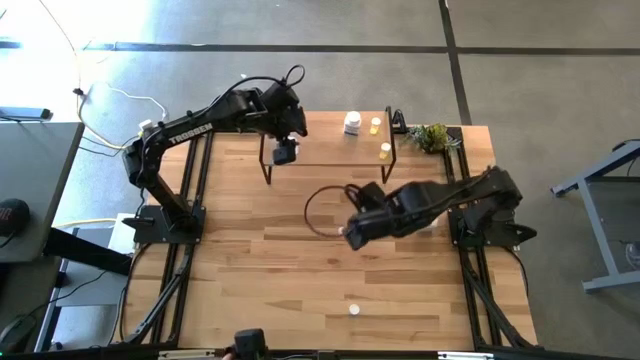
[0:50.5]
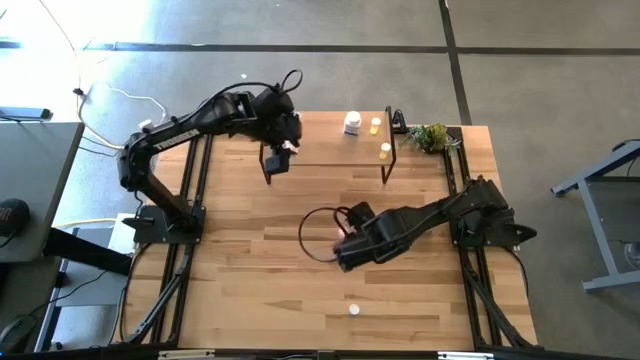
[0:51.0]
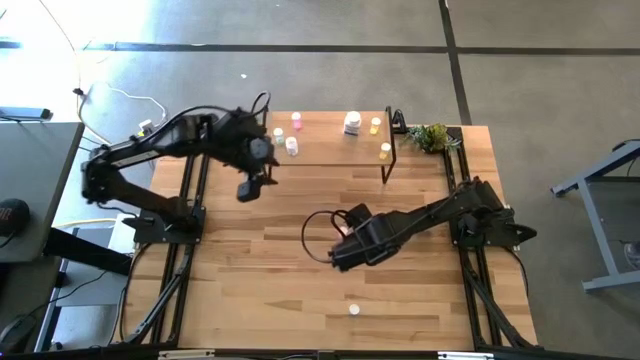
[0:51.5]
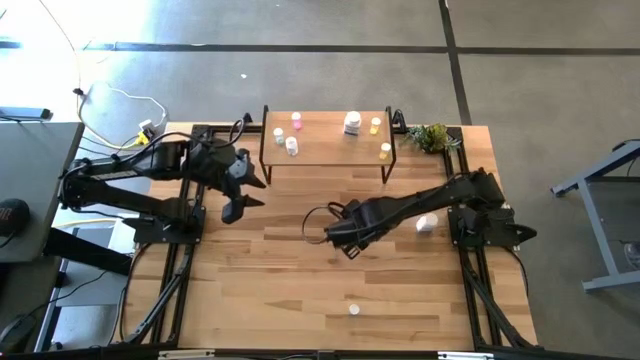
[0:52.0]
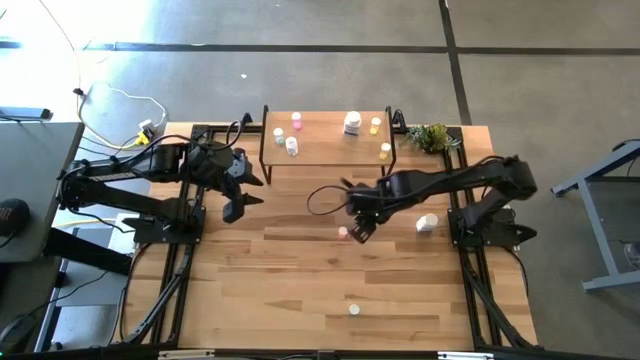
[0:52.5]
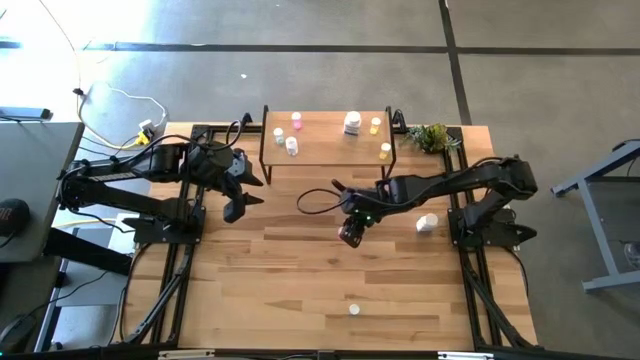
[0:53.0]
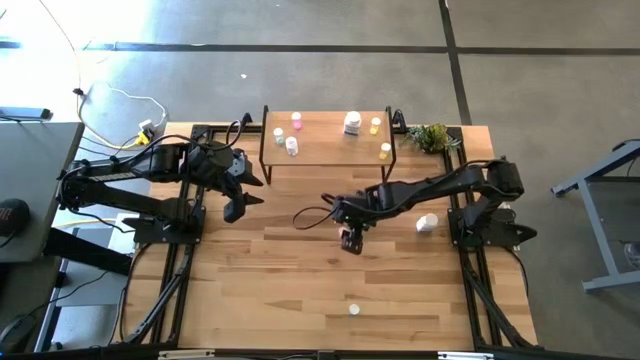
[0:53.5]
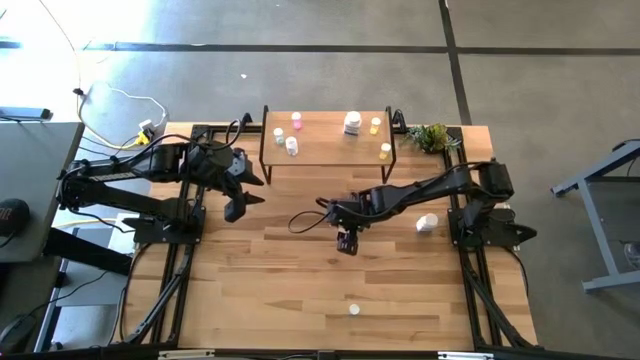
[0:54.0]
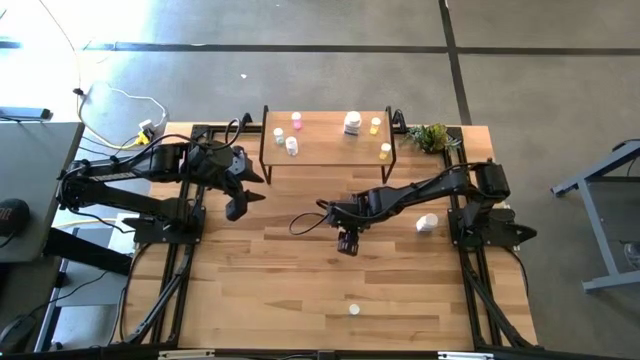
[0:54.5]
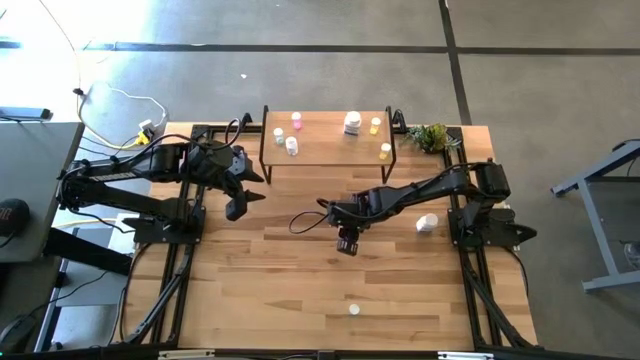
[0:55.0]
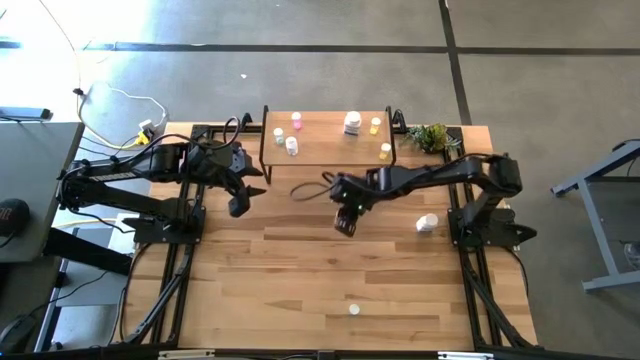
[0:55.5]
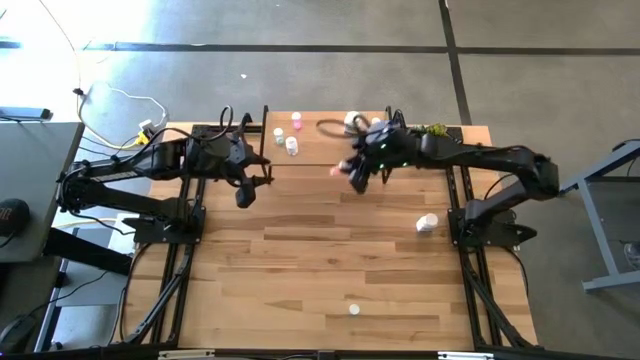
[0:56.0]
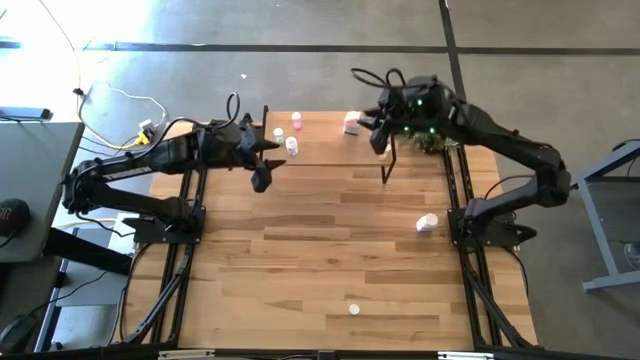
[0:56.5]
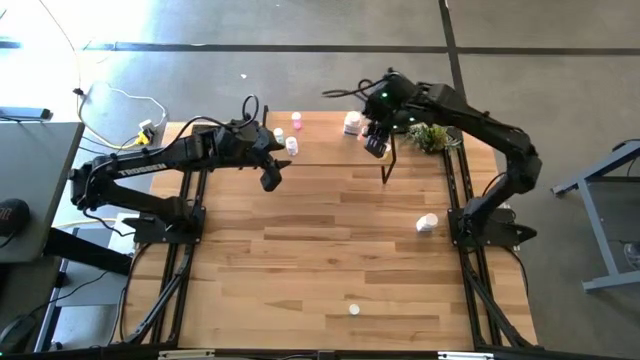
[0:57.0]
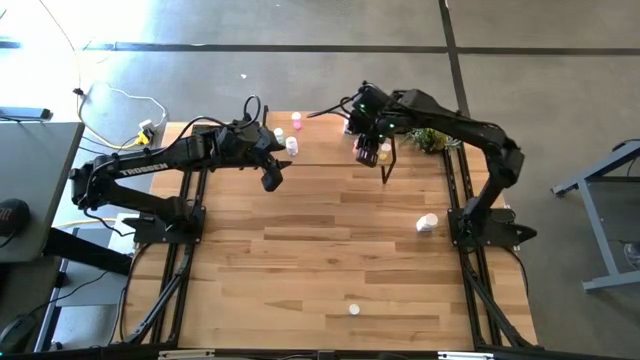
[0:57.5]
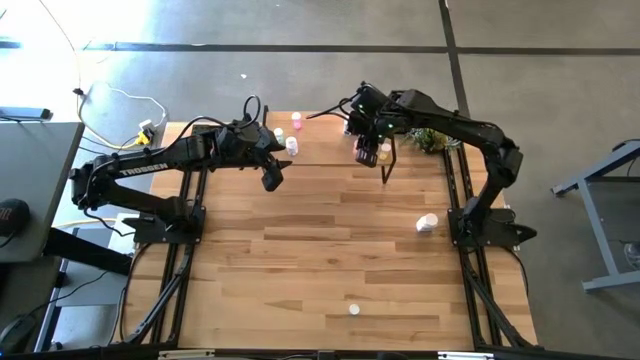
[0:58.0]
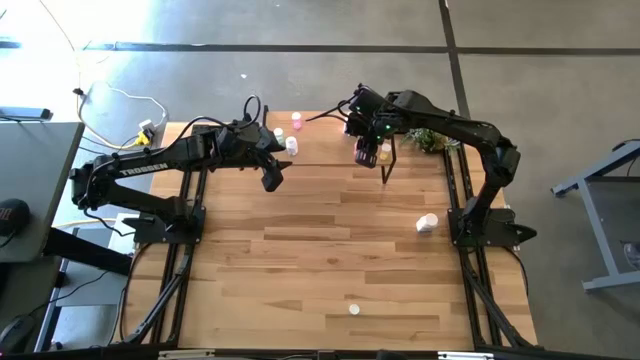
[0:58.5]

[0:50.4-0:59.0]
Task: Pick and place medicine bottles onto shelf by color
Put the pink pill bottle on the shelf

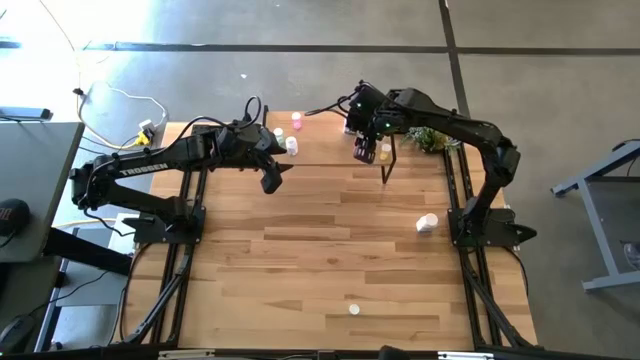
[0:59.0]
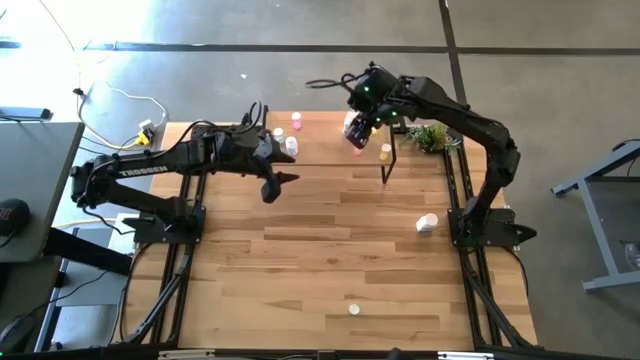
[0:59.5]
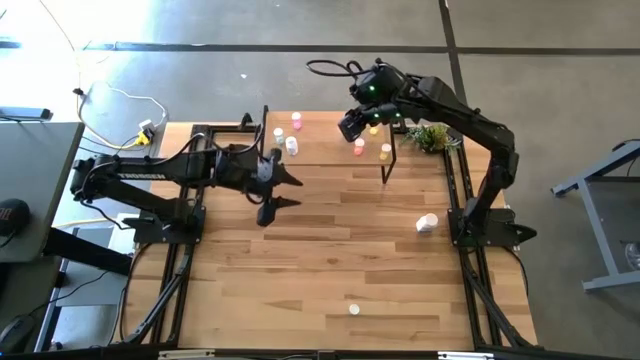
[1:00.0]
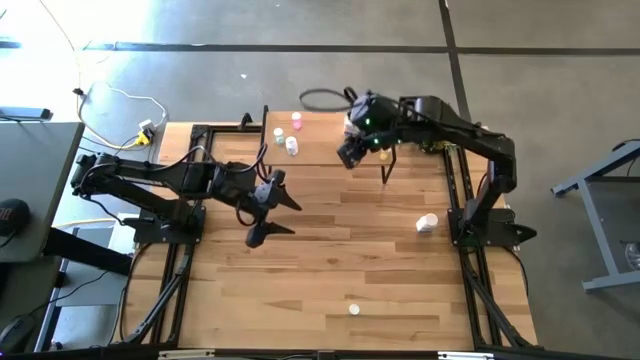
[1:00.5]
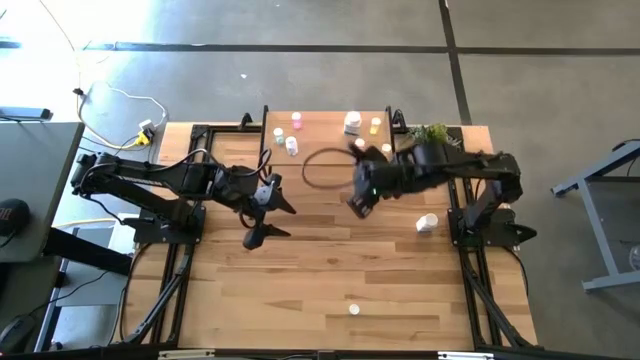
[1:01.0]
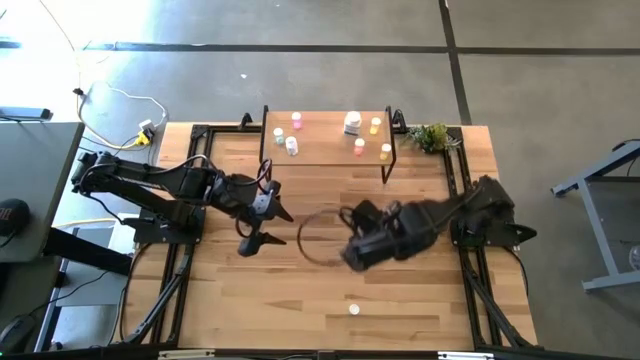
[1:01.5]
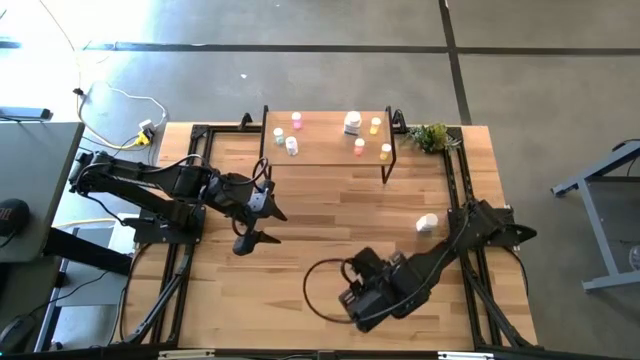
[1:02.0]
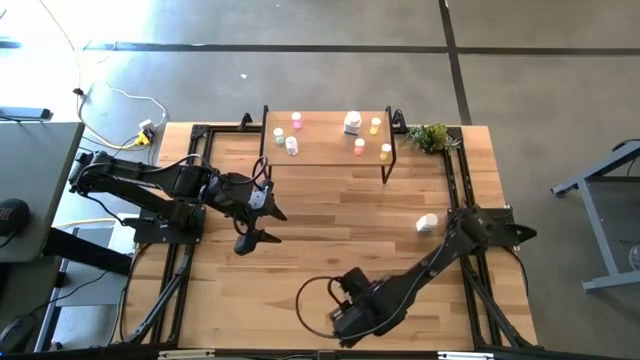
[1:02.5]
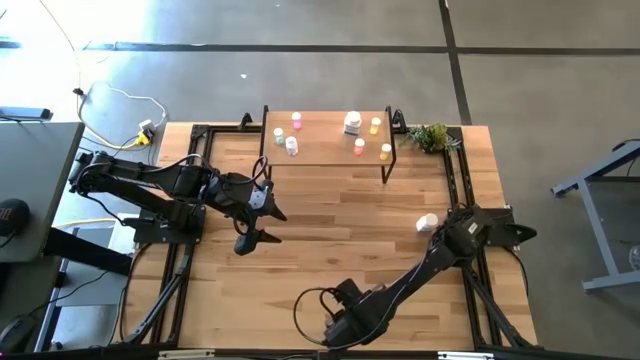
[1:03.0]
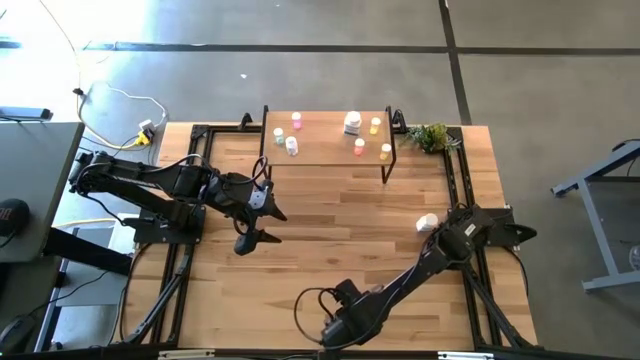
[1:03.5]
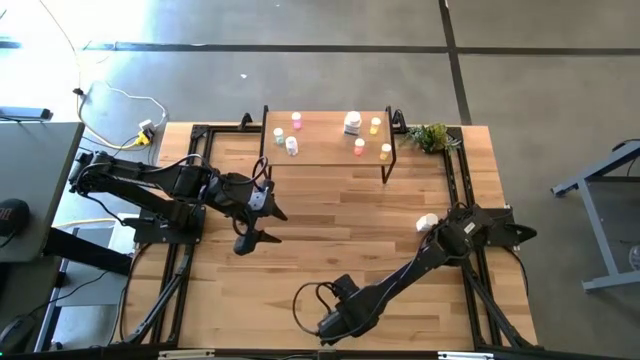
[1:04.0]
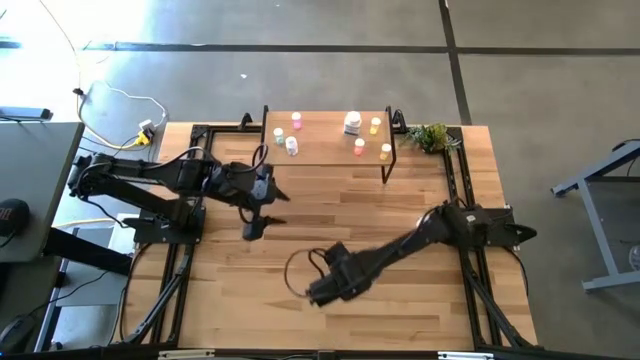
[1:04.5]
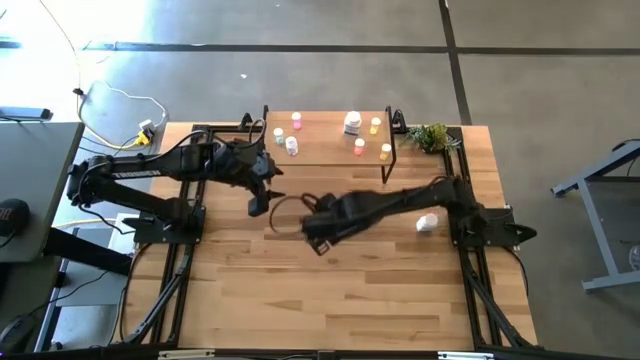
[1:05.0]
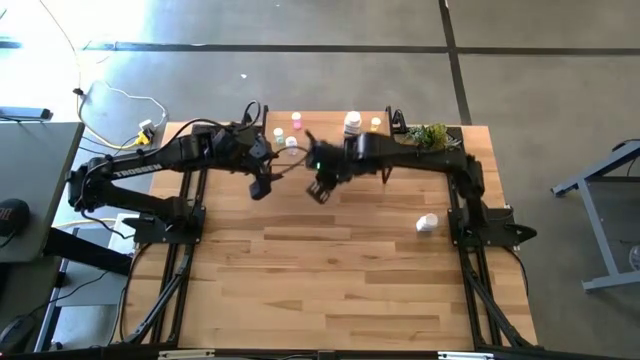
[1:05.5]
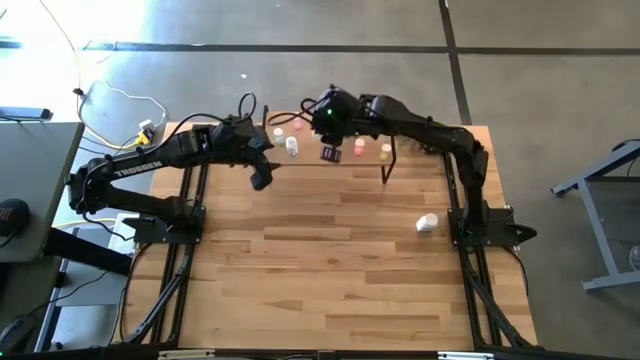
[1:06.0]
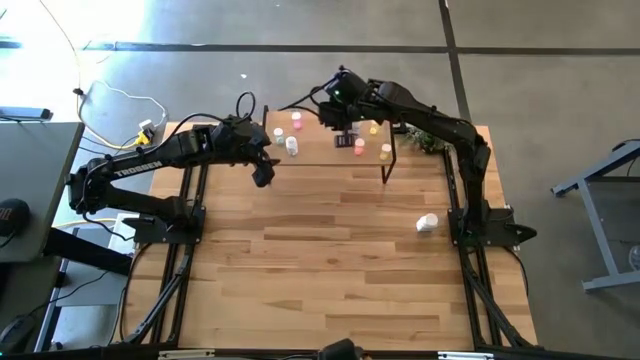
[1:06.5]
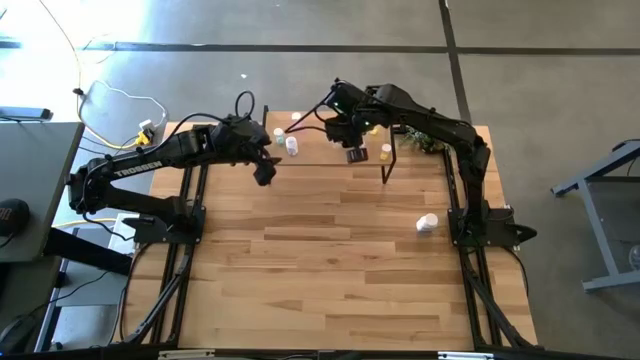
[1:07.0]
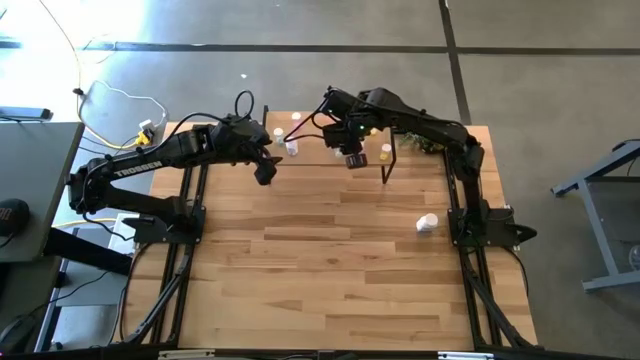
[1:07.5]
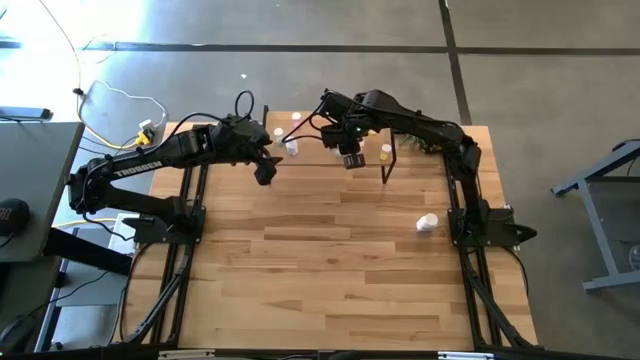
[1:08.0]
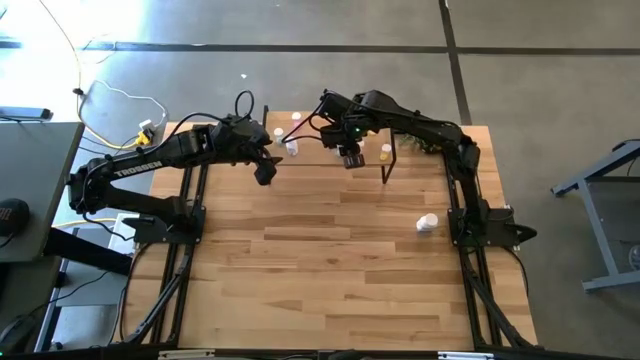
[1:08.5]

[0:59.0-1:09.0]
Put the green pill bottle on the shelf

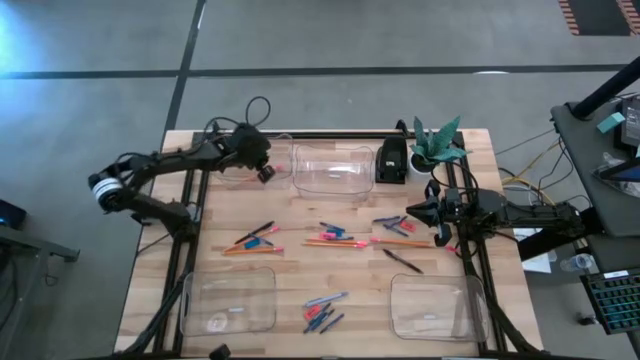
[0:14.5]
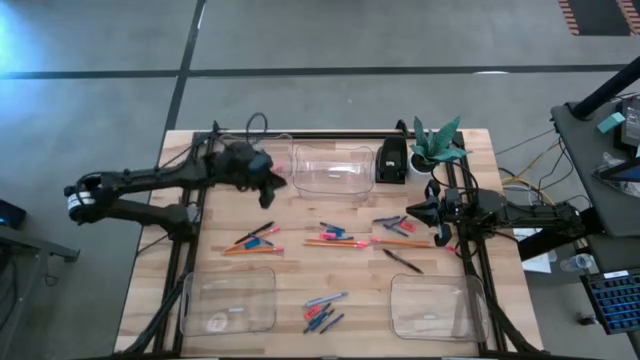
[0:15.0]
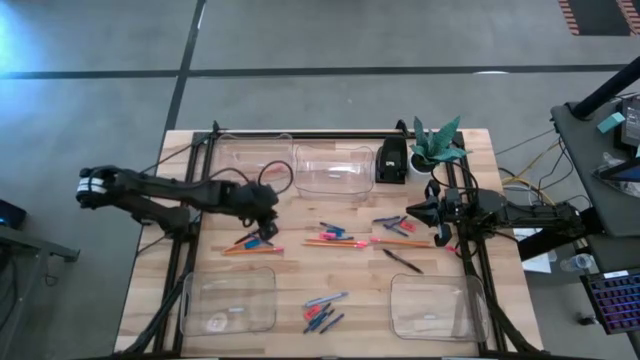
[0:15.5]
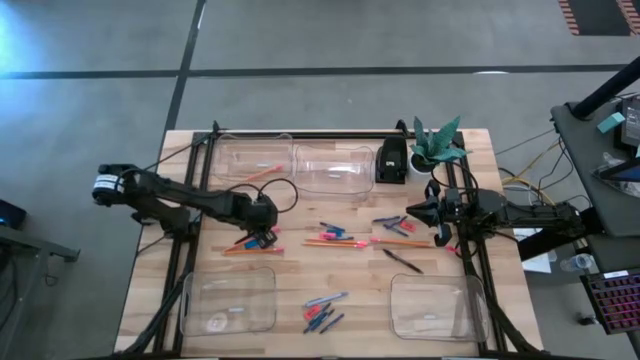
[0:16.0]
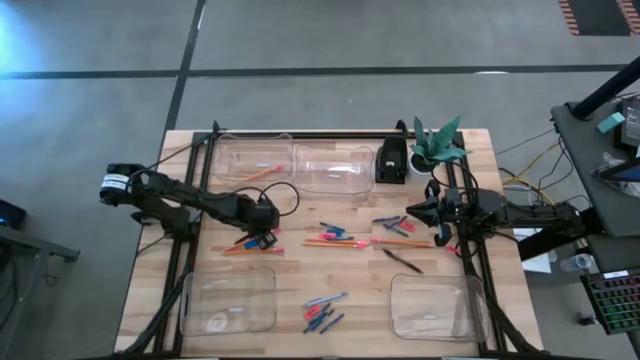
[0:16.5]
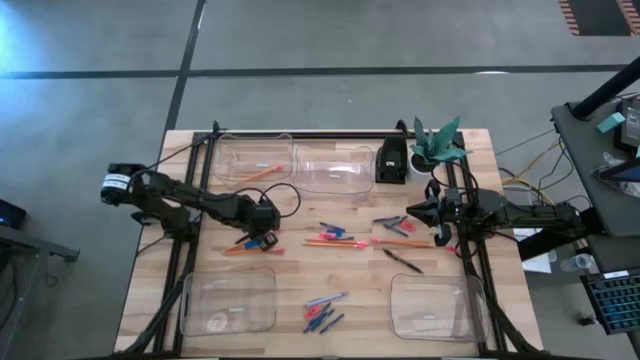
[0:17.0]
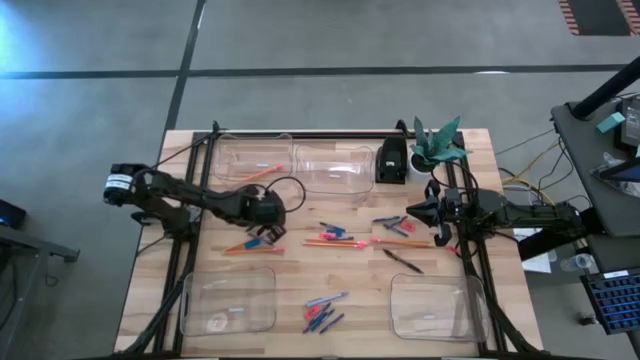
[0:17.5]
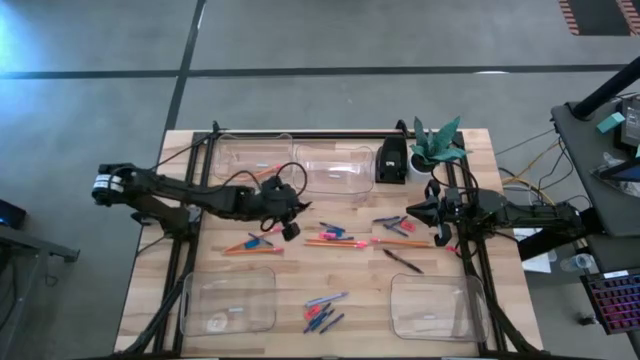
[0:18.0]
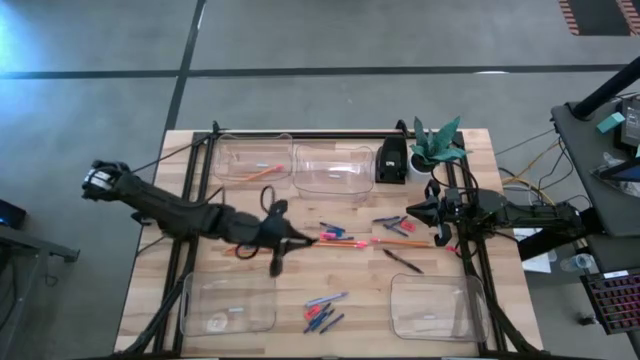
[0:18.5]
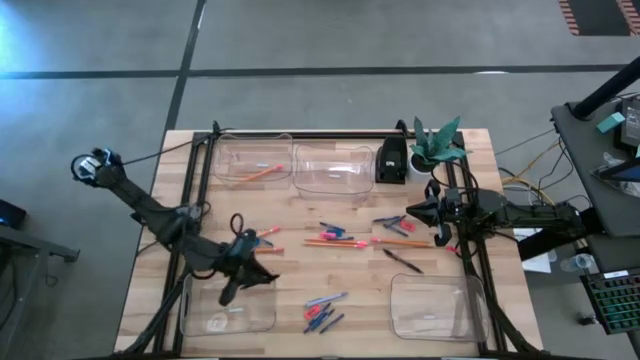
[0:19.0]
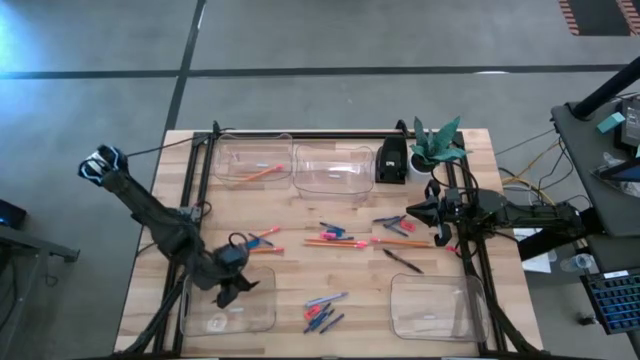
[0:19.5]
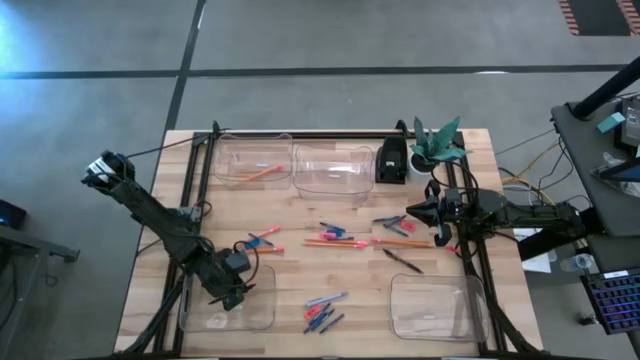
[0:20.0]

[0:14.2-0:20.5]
Task: Sort crayons/erasers/pens/pencils in bins
Put the black pen into the bottom left transparent bin
